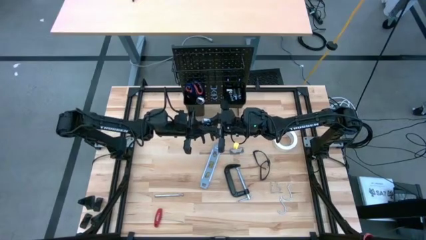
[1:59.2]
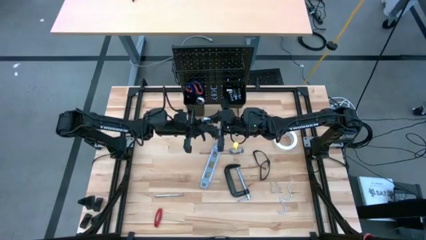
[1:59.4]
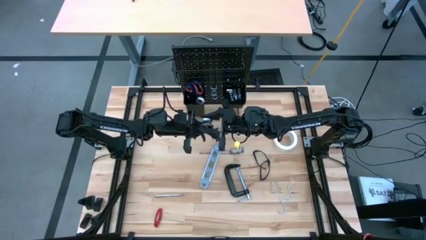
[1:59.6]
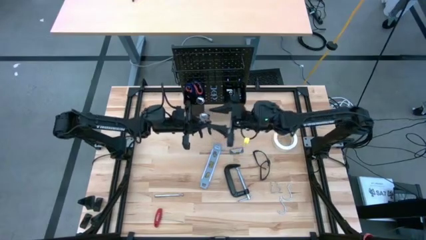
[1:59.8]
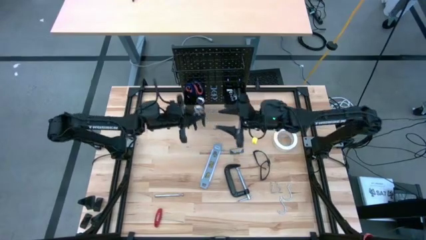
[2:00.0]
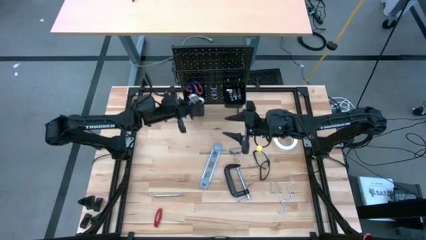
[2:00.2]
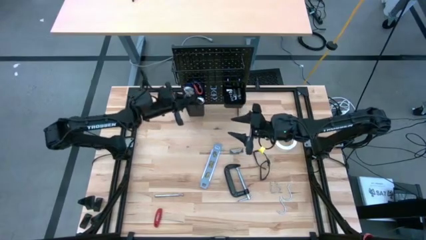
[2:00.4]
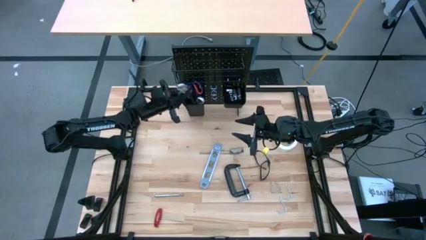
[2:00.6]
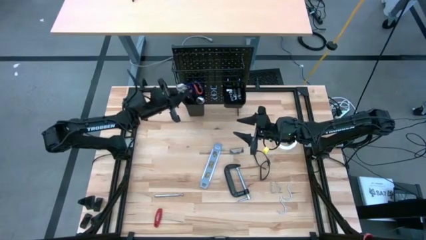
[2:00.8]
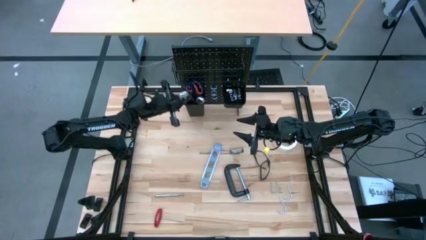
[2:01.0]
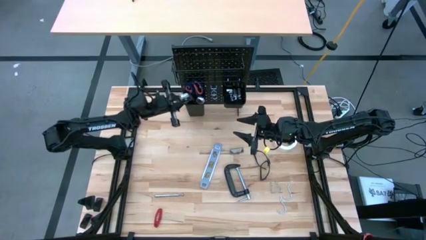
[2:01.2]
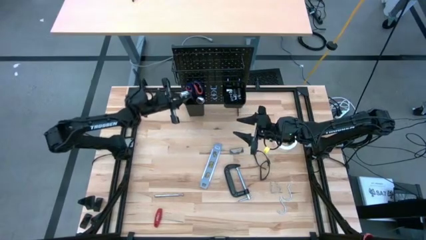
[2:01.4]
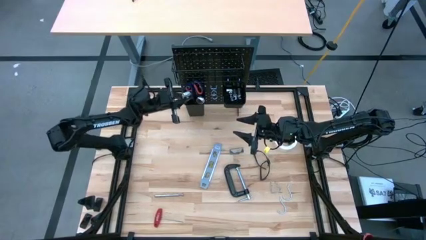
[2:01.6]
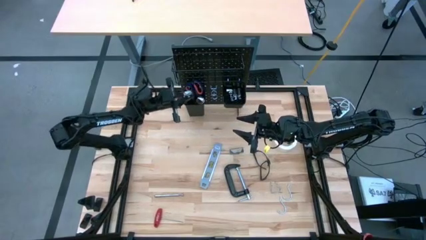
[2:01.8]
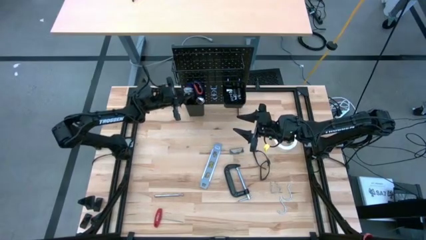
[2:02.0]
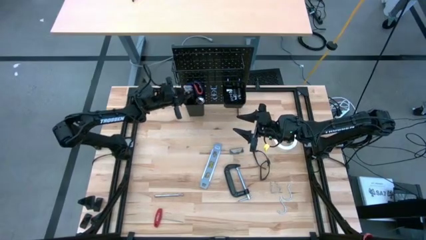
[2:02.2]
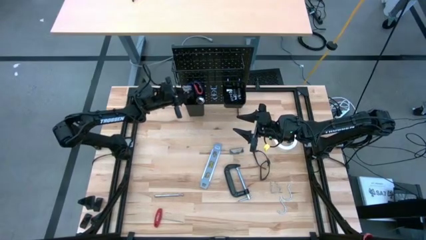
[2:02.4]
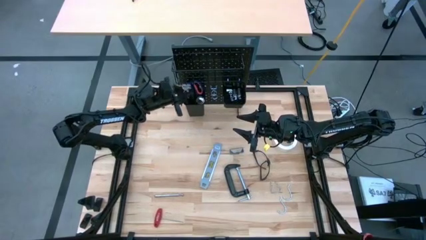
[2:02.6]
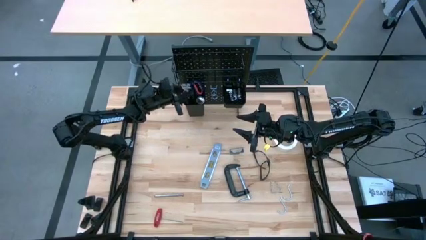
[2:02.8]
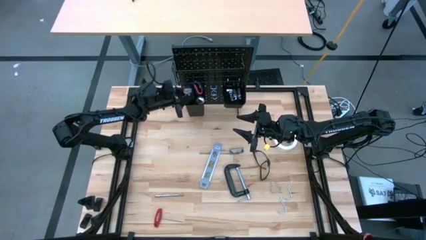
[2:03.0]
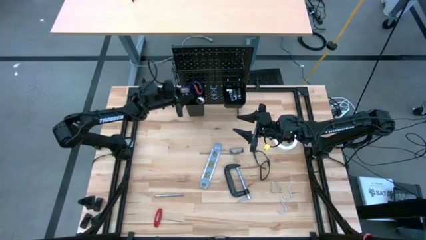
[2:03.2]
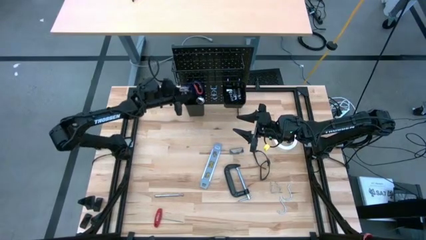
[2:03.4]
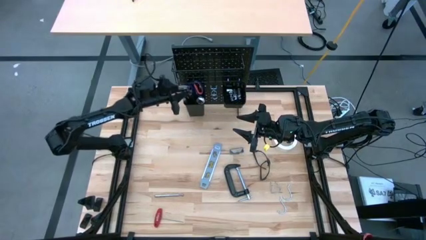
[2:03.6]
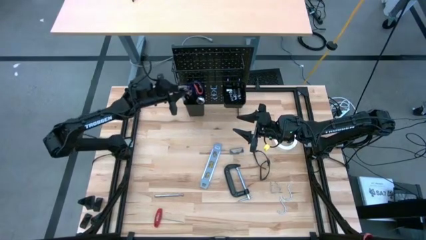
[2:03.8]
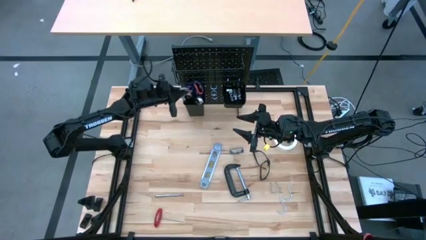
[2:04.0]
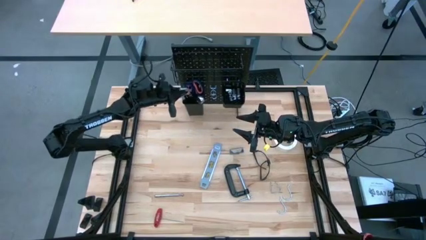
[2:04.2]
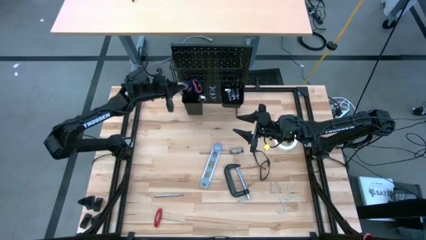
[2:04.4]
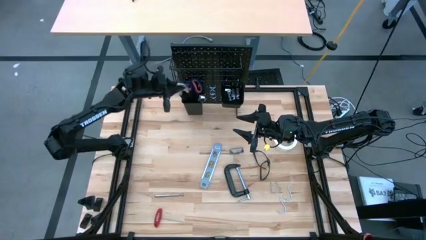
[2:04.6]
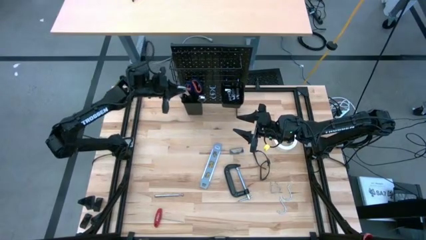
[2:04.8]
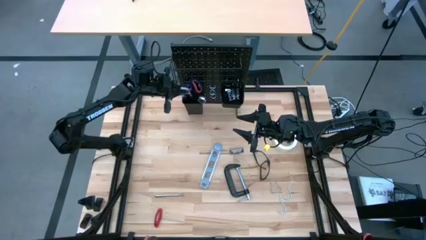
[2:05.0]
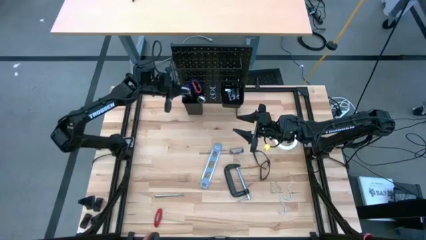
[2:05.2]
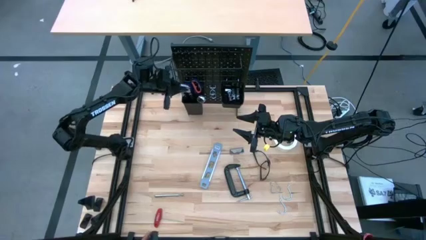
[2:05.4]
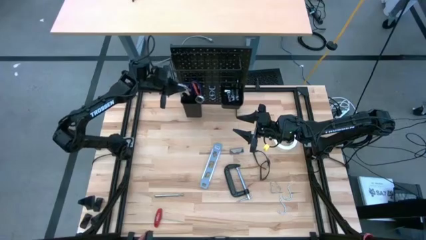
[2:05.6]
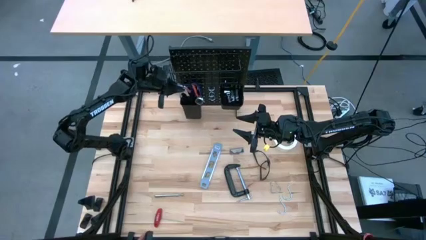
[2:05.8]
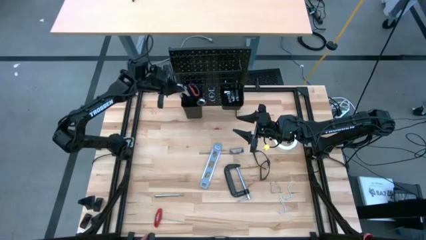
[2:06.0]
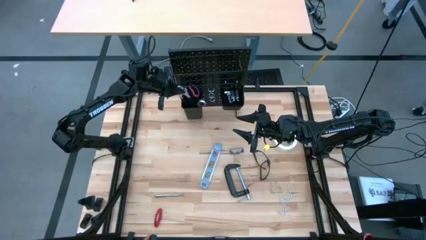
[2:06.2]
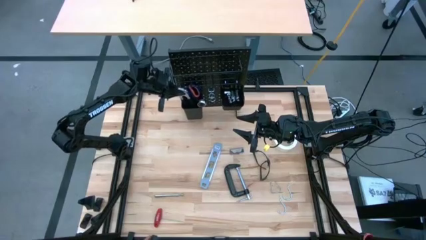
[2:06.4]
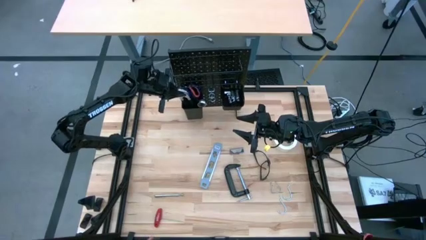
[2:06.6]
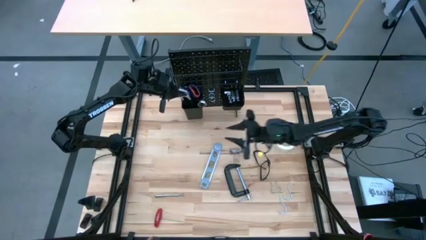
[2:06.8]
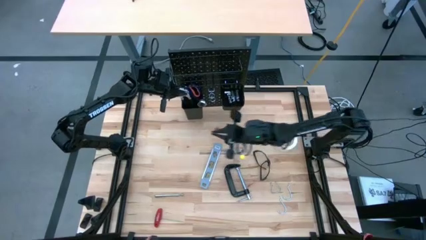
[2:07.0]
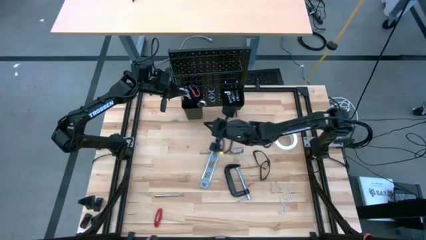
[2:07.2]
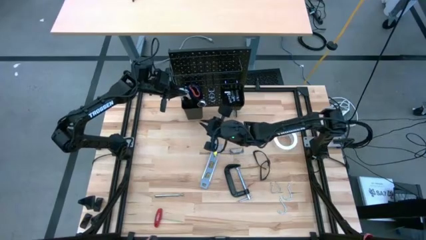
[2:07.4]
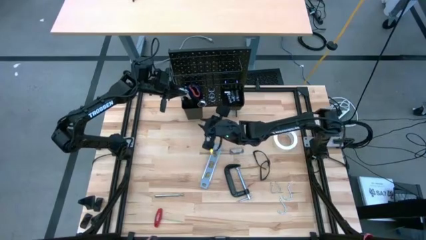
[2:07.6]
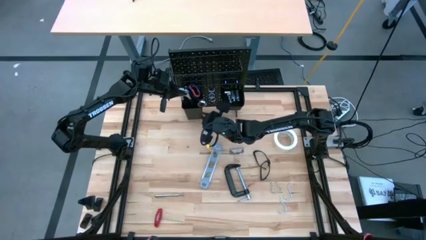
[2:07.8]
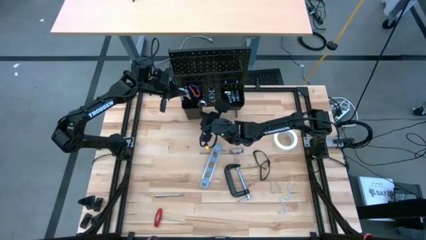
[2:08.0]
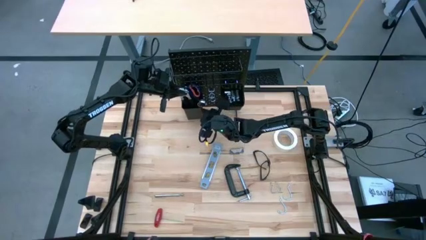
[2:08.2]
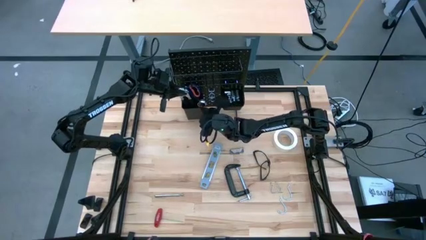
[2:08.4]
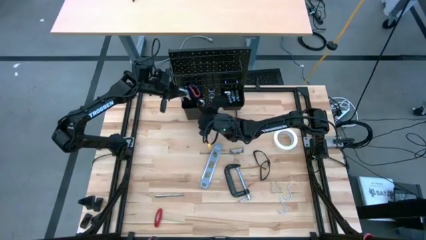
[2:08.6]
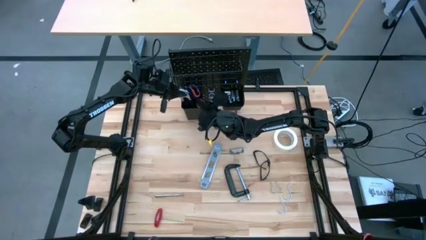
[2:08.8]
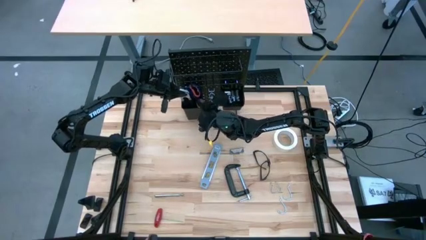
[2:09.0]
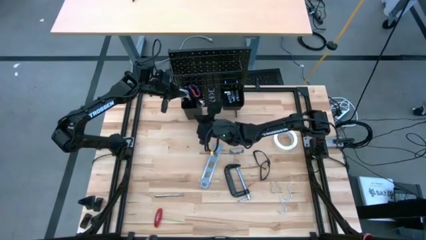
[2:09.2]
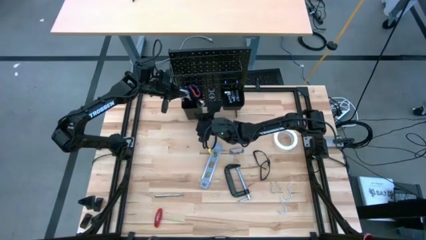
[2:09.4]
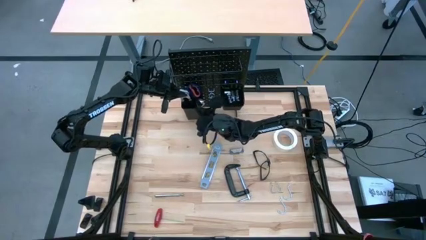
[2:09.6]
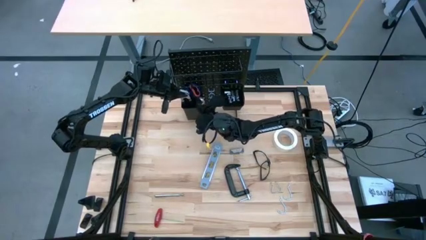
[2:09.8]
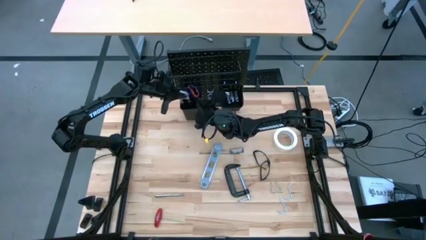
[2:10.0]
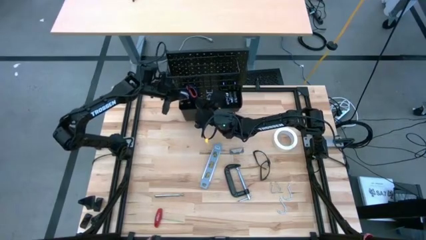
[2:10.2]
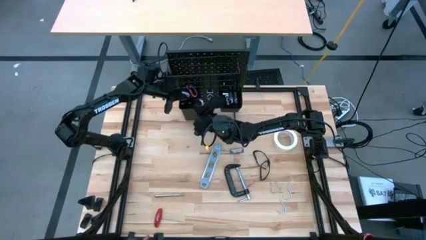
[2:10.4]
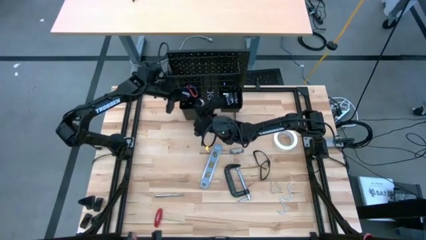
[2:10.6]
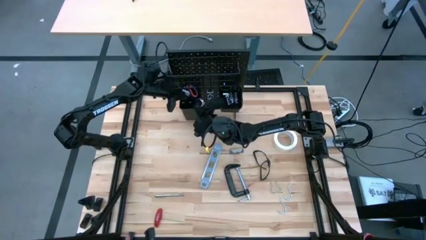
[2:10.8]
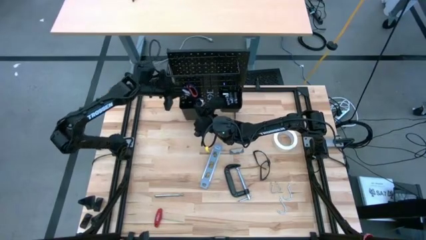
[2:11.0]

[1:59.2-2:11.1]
Task: Hang tools onto peg board
Put the slip-joint pliers into the left black bin on the peg board
